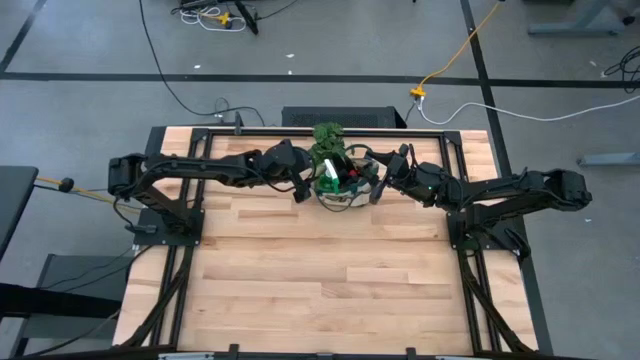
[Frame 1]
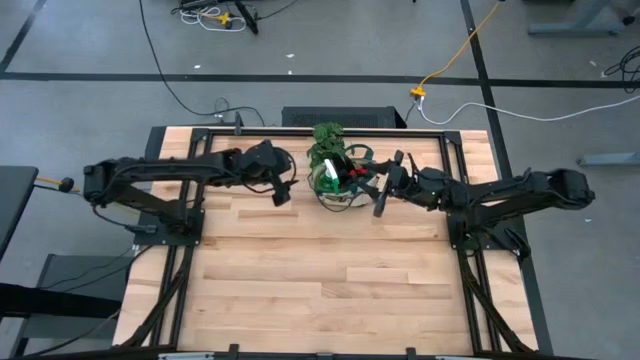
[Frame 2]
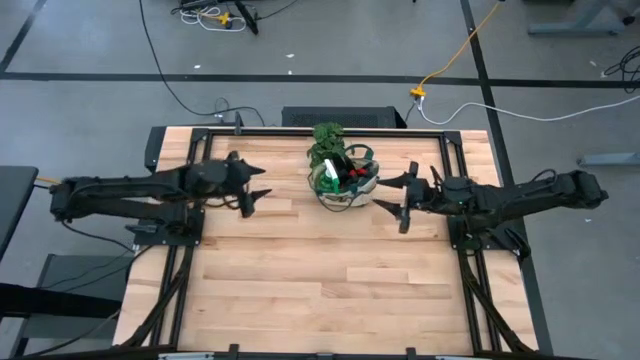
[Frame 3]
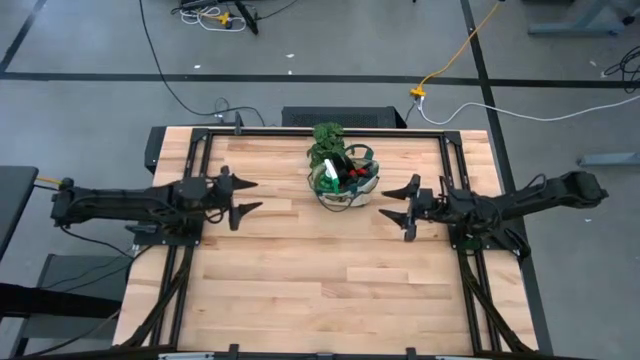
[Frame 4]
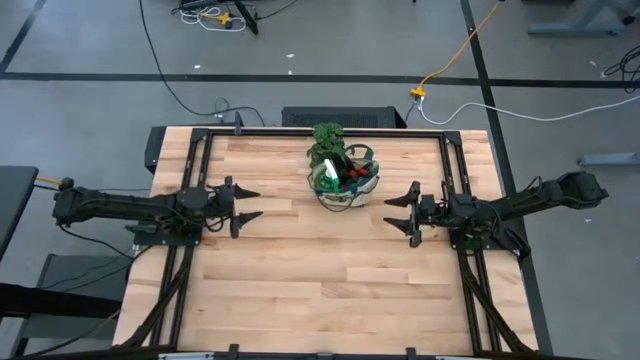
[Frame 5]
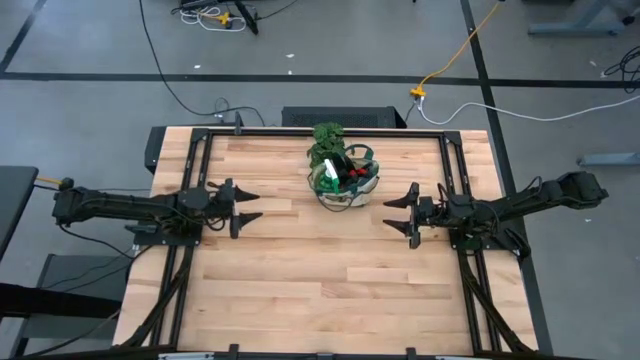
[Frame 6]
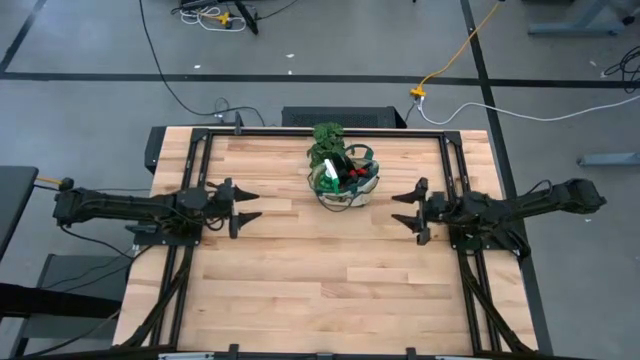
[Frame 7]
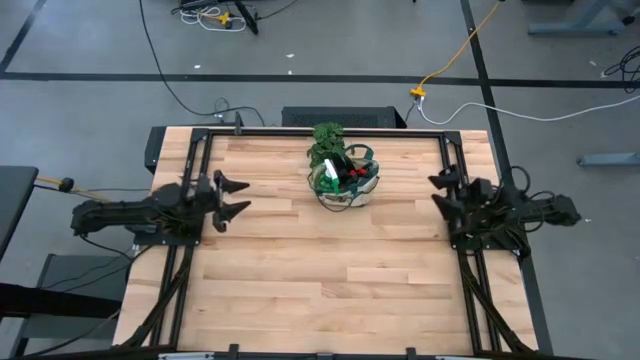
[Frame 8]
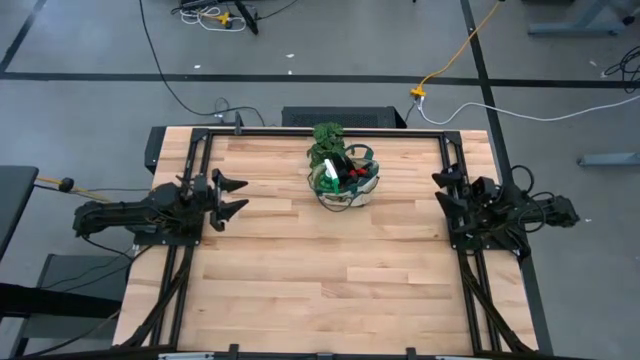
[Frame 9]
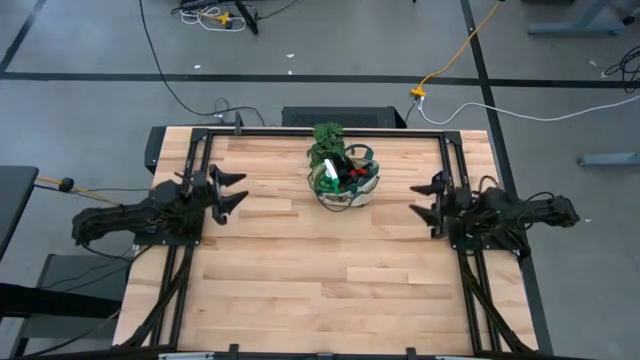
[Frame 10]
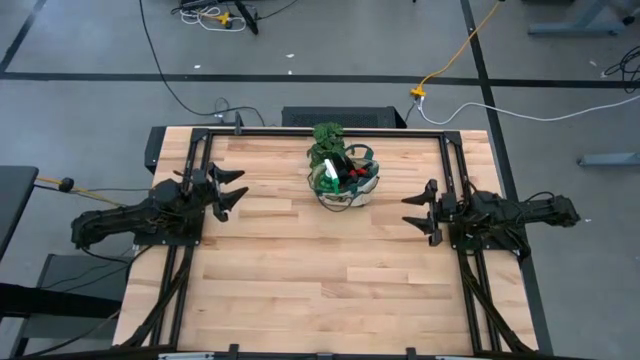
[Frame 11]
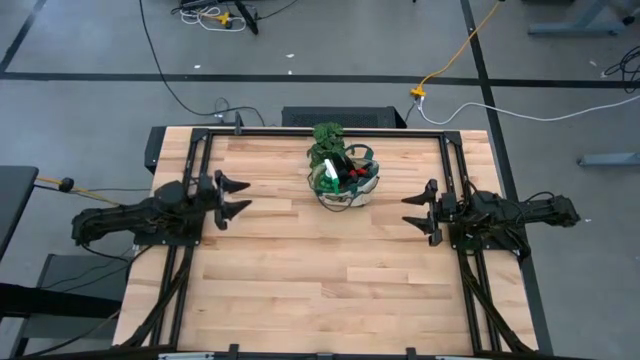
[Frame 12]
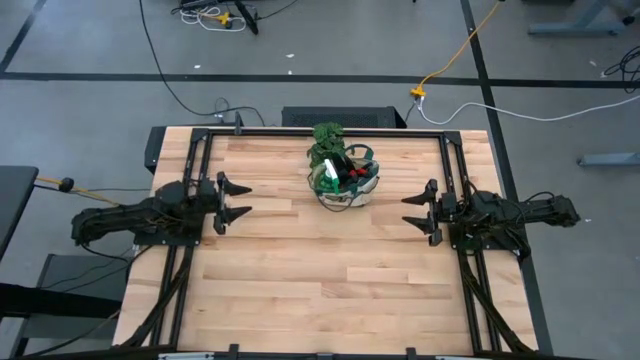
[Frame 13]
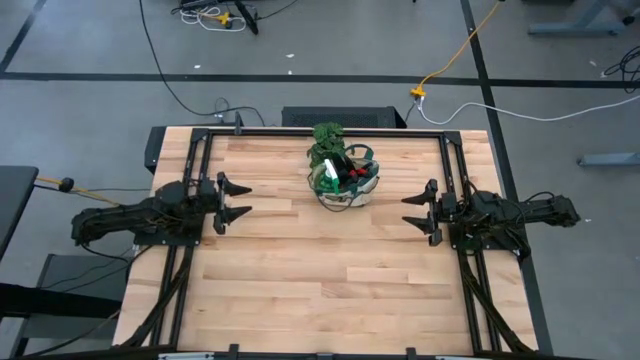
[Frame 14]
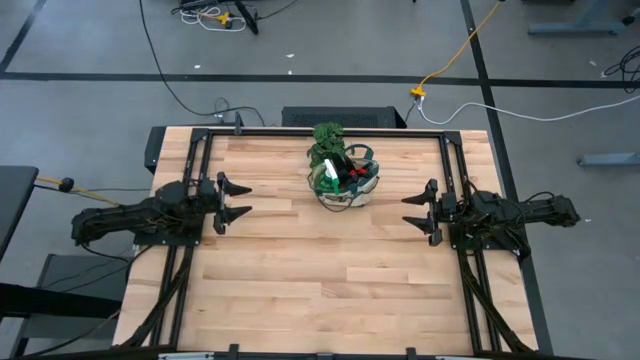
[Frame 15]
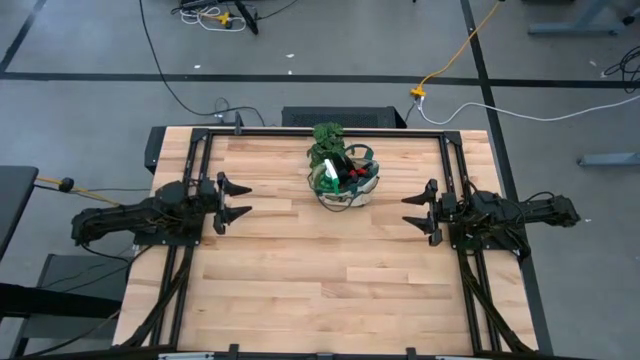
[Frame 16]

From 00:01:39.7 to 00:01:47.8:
Task: Pick & Place Garden tools in Gardening bag
Return to Home Position

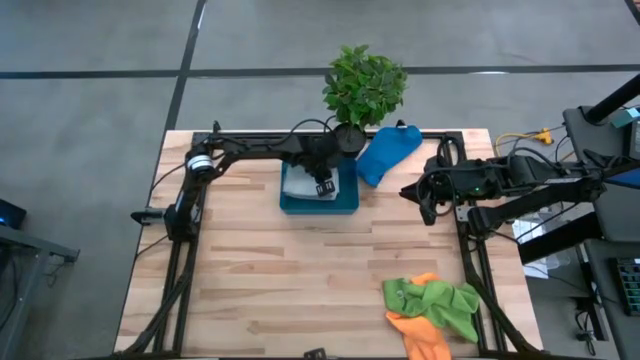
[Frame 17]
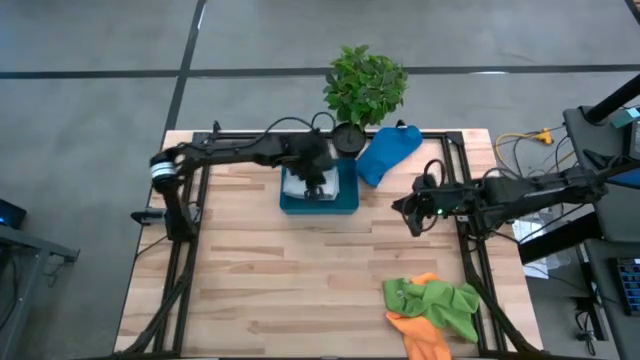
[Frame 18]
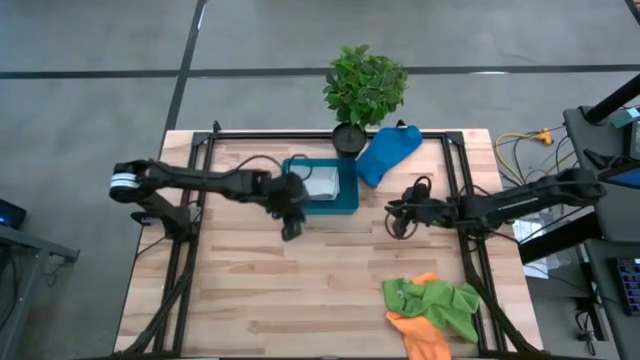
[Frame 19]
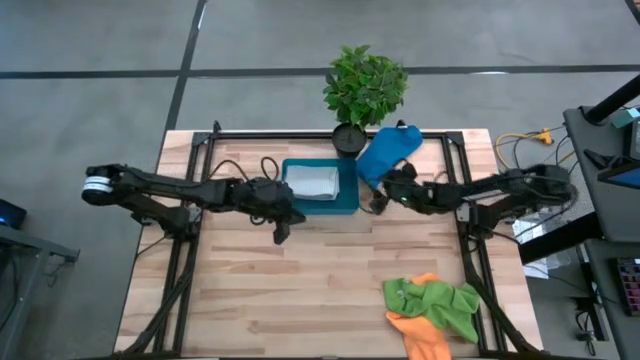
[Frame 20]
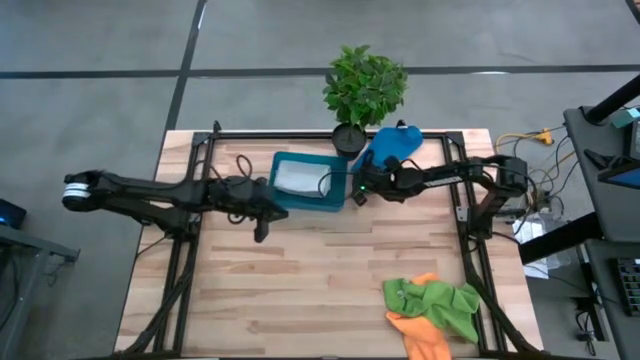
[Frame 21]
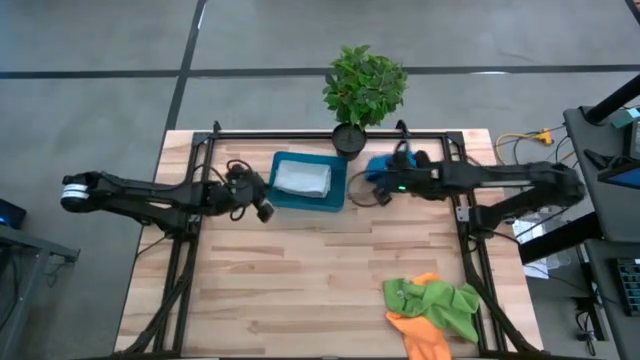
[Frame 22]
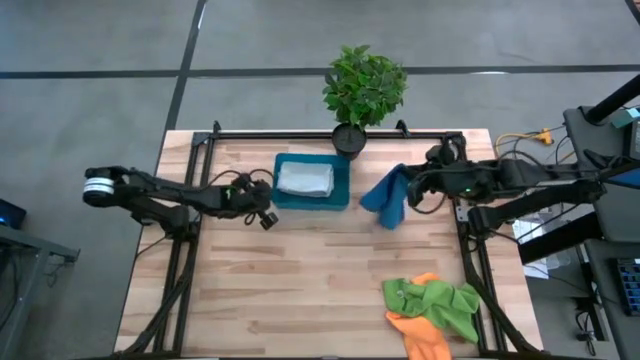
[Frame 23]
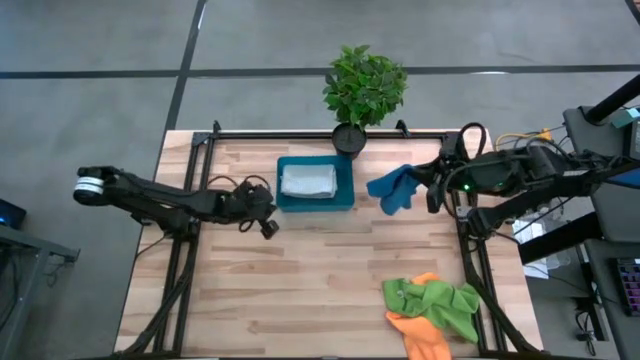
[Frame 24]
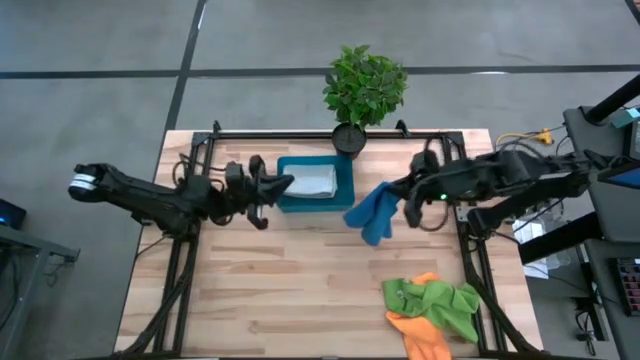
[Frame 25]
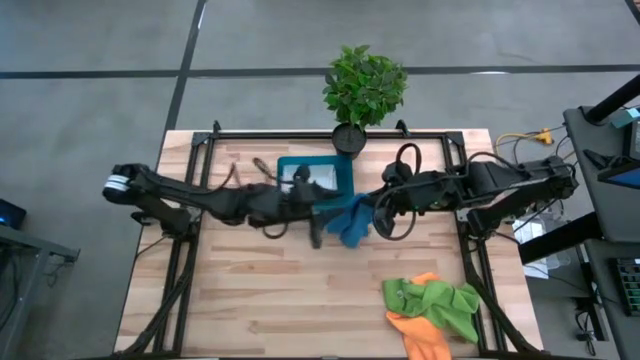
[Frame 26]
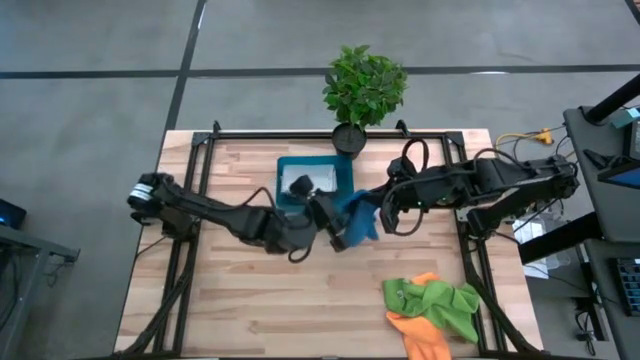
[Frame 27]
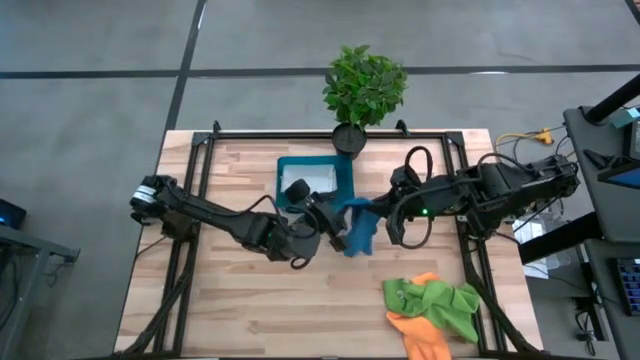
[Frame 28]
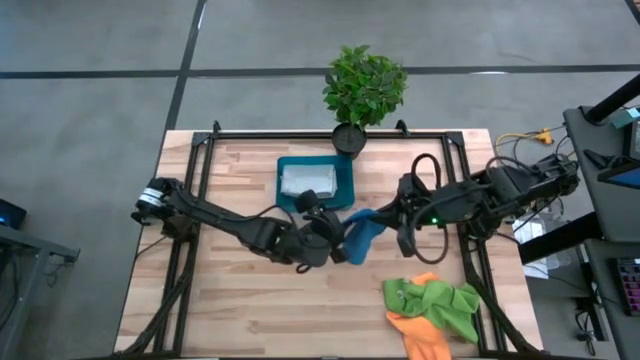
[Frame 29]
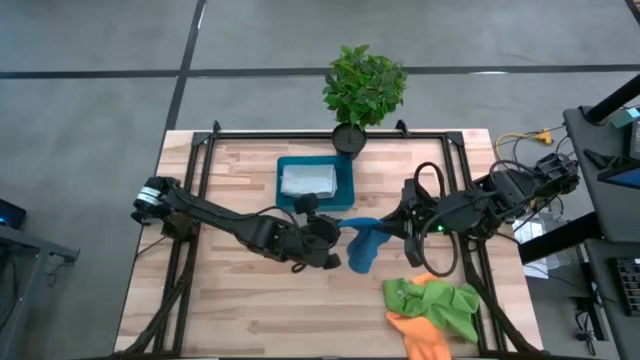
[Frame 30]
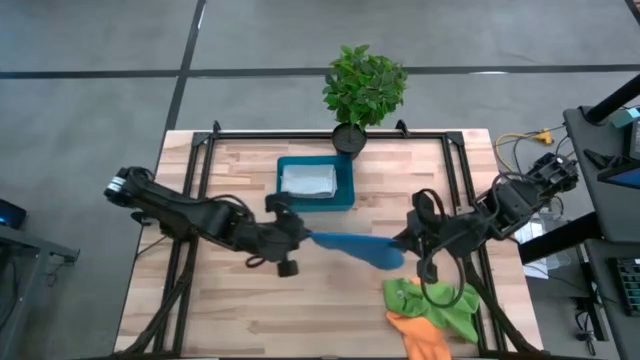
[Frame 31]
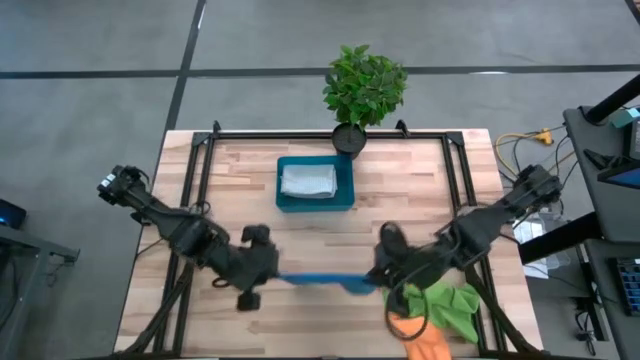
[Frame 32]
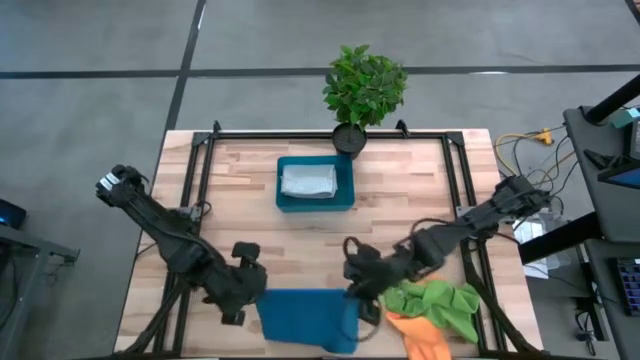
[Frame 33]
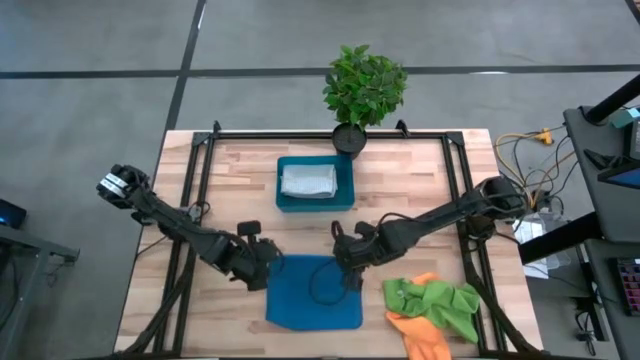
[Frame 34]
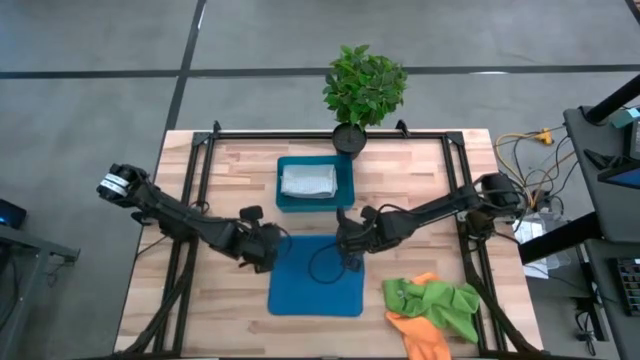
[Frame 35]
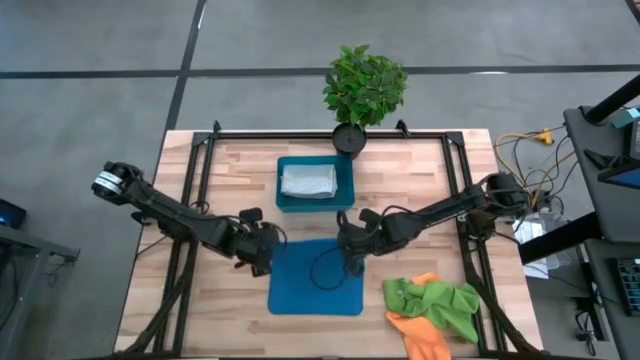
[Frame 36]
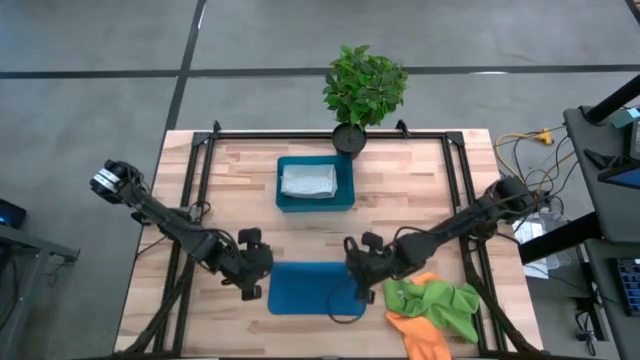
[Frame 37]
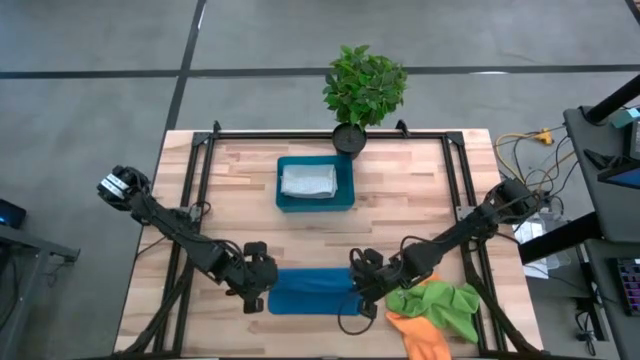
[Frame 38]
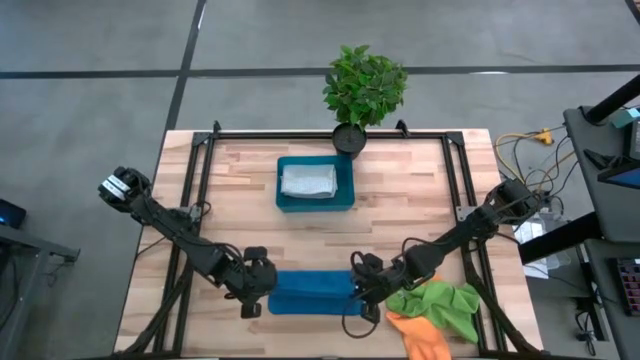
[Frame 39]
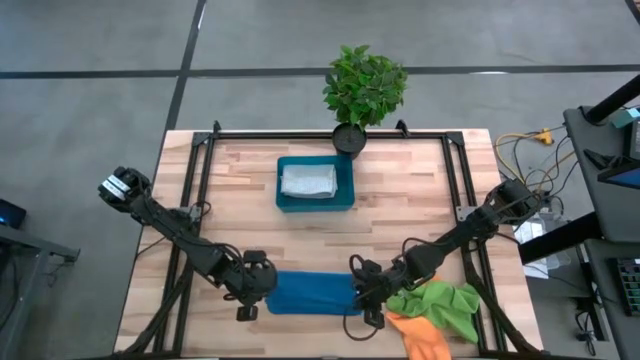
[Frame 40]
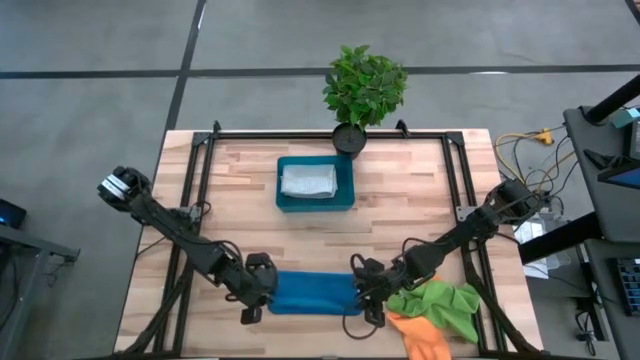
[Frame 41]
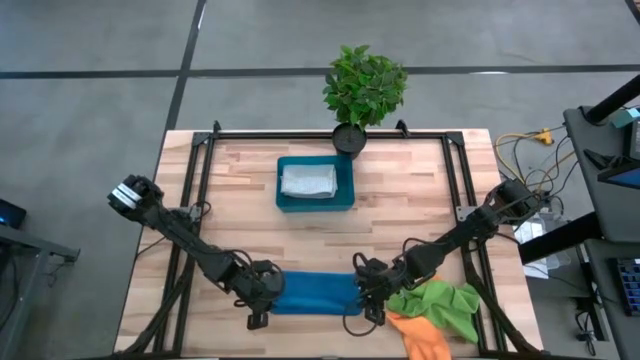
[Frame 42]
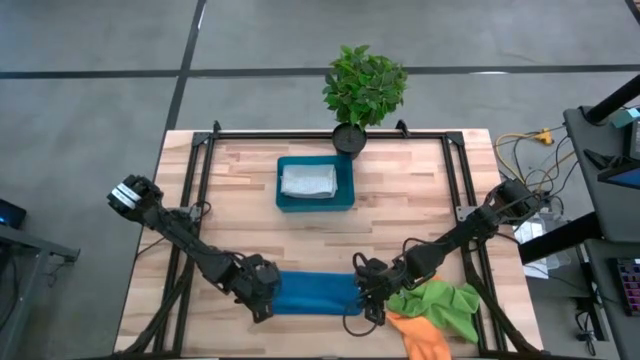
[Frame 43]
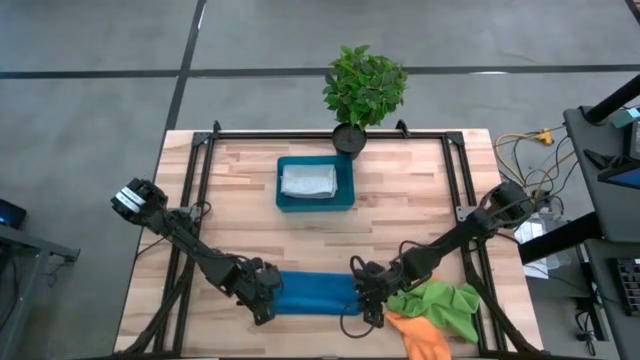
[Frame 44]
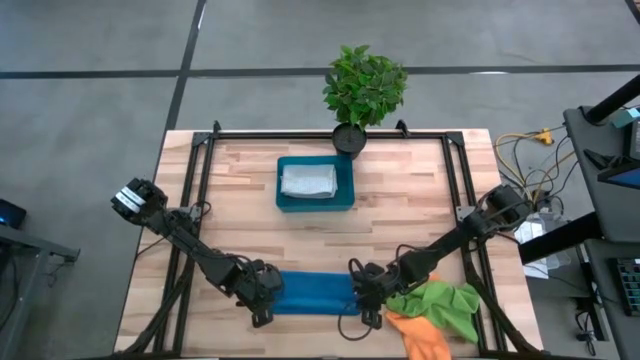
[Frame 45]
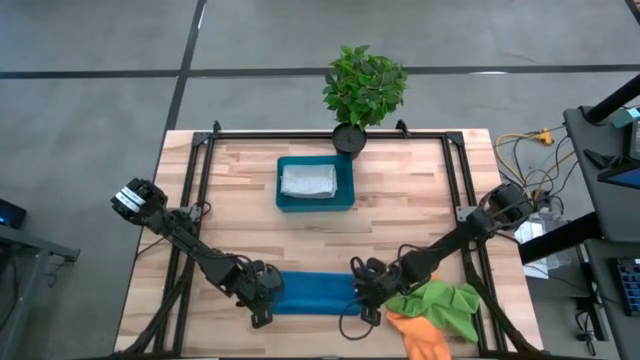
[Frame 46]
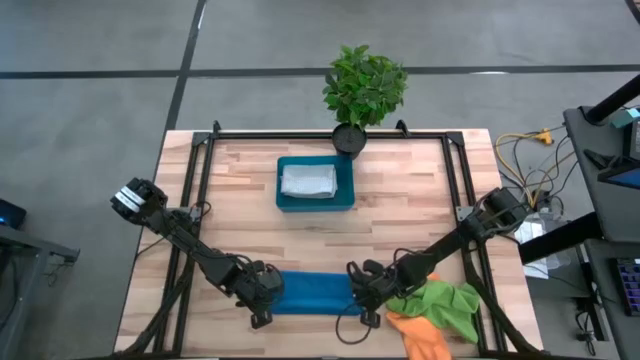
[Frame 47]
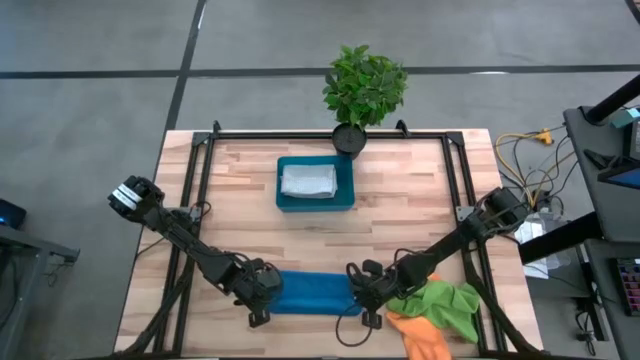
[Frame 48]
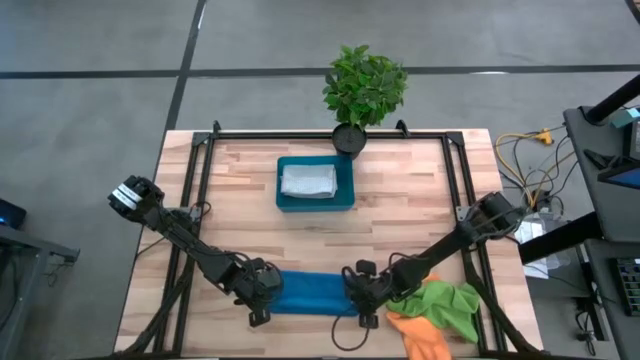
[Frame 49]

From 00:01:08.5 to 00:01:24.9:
Task: Fold microfiber towels
Fold the blue microfiber towel
